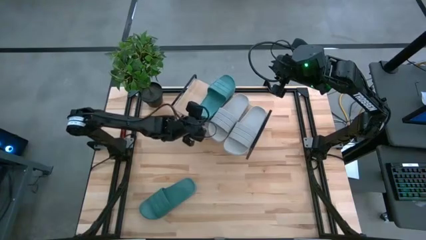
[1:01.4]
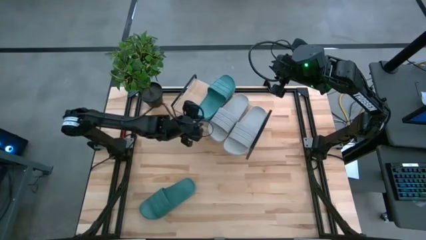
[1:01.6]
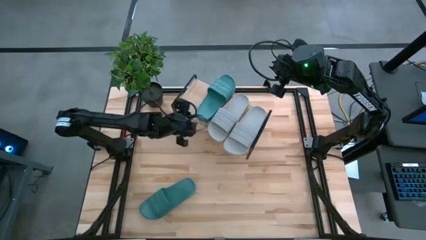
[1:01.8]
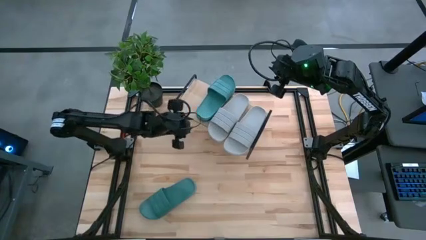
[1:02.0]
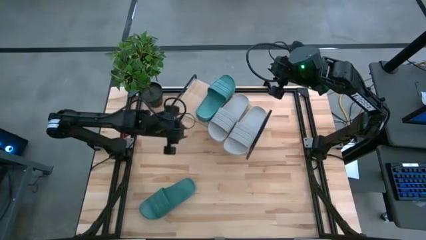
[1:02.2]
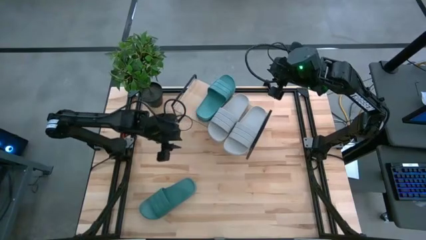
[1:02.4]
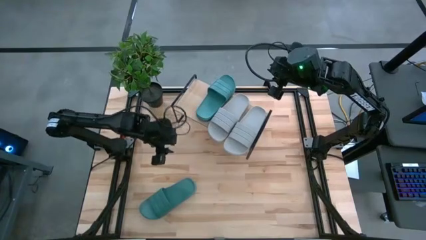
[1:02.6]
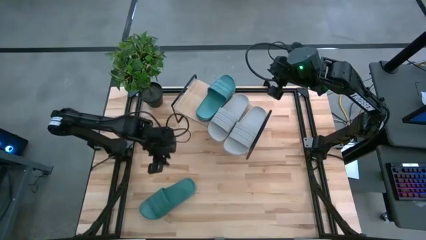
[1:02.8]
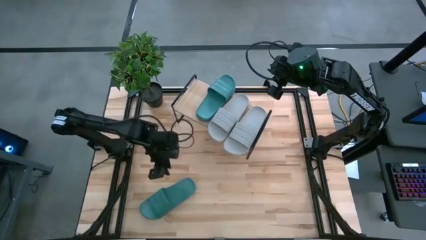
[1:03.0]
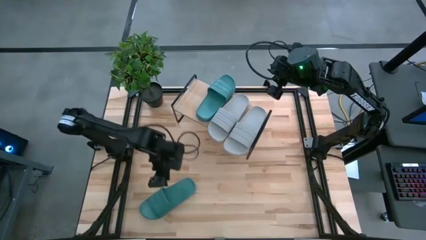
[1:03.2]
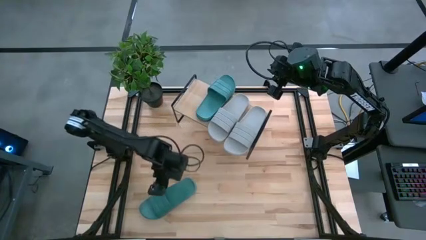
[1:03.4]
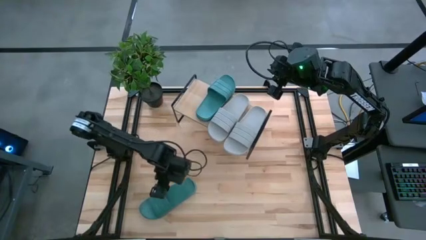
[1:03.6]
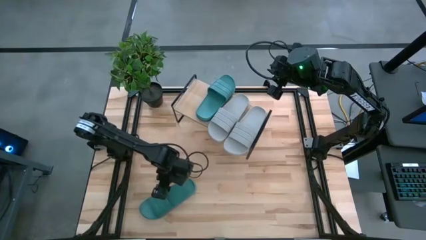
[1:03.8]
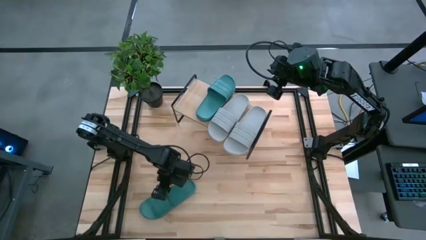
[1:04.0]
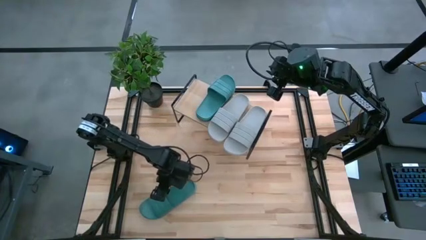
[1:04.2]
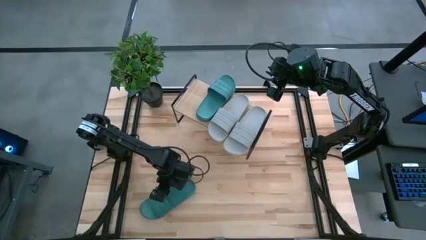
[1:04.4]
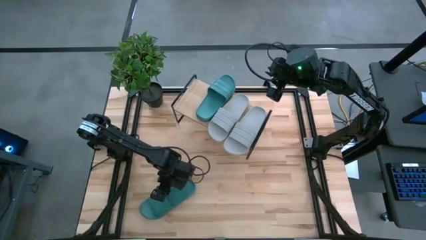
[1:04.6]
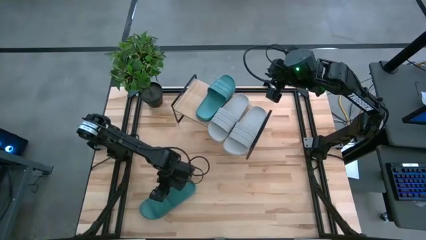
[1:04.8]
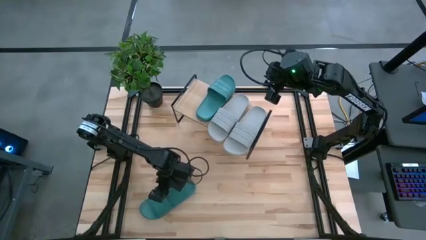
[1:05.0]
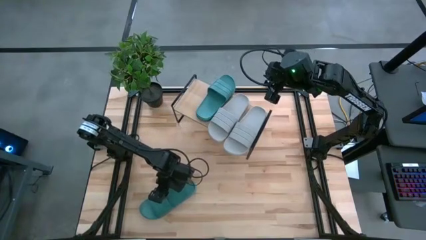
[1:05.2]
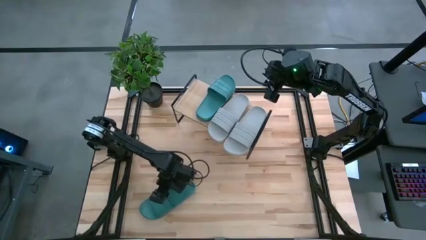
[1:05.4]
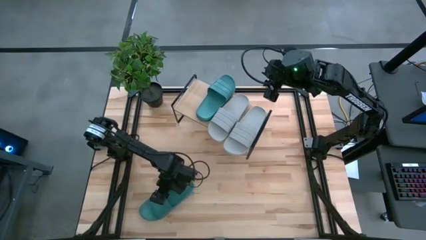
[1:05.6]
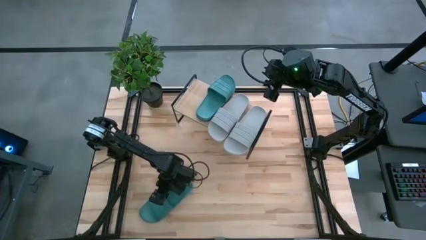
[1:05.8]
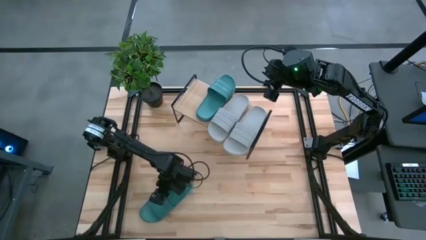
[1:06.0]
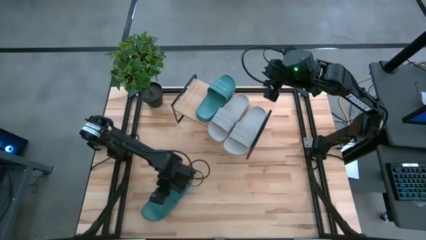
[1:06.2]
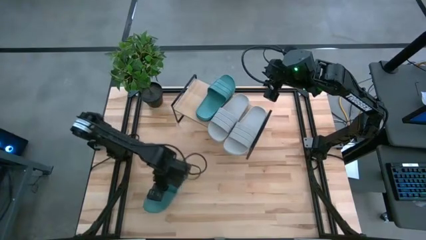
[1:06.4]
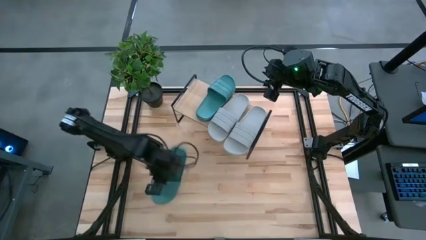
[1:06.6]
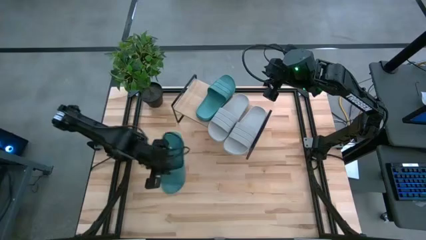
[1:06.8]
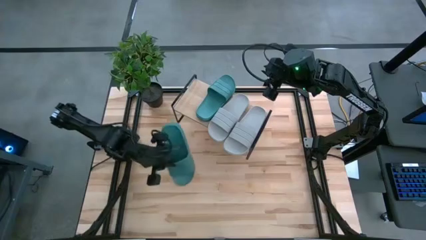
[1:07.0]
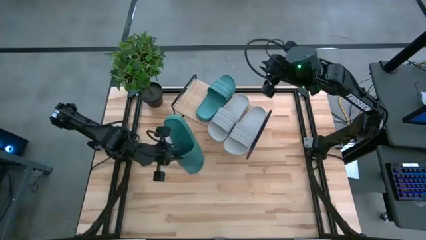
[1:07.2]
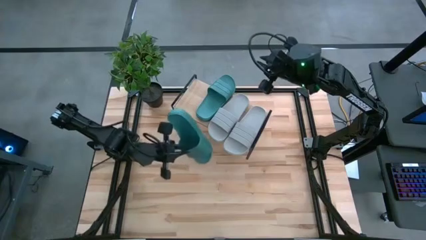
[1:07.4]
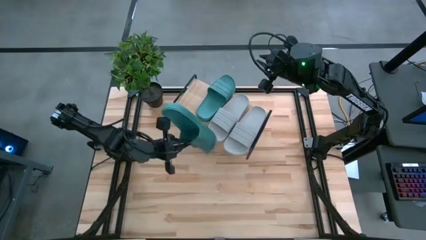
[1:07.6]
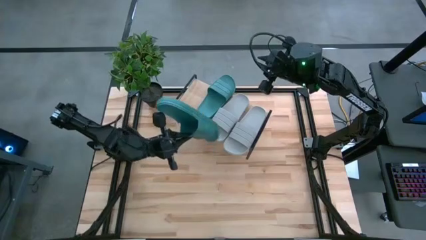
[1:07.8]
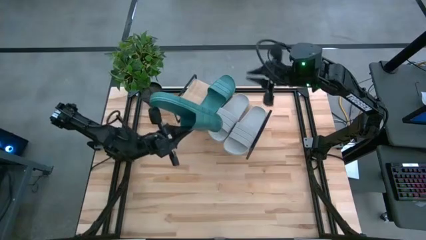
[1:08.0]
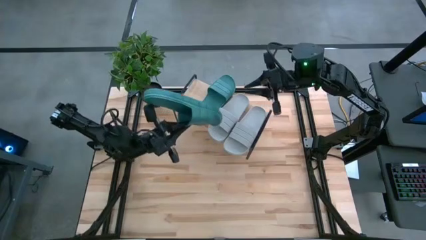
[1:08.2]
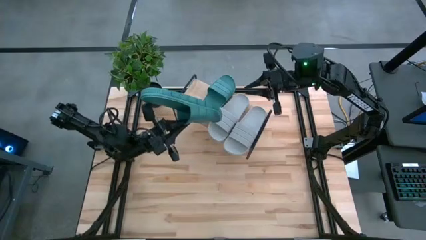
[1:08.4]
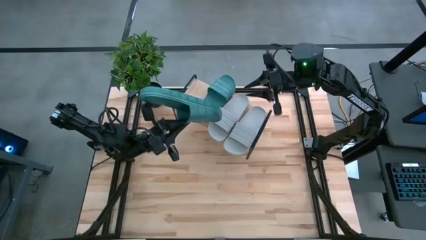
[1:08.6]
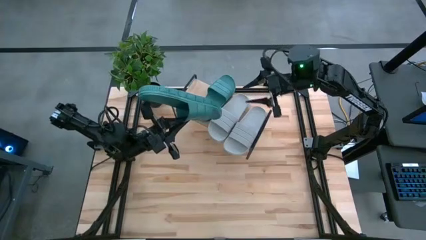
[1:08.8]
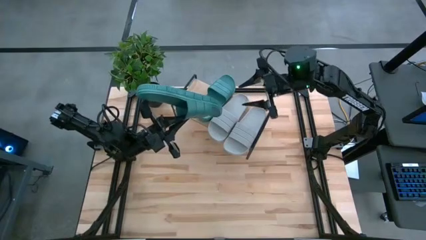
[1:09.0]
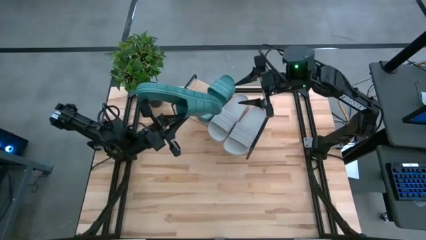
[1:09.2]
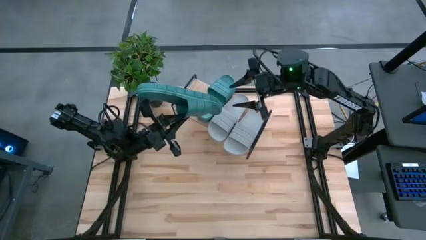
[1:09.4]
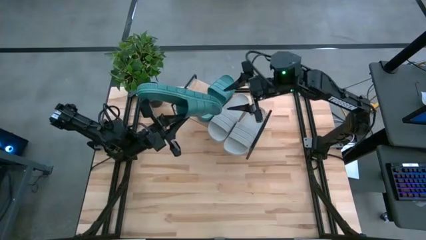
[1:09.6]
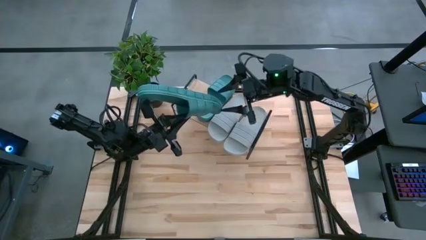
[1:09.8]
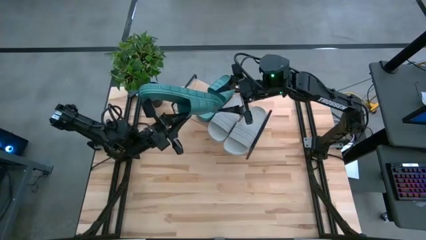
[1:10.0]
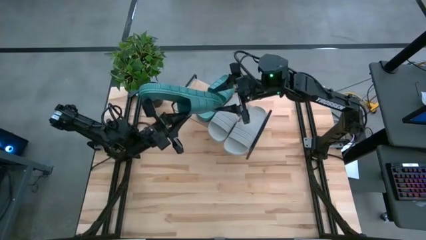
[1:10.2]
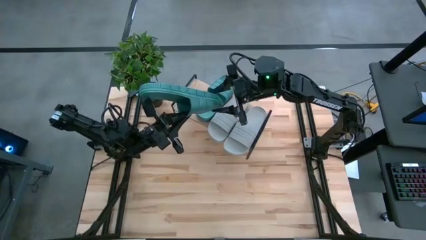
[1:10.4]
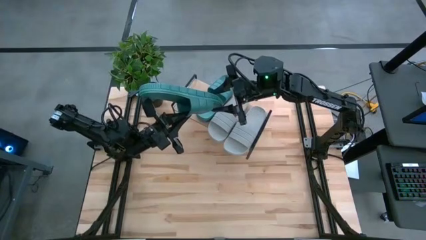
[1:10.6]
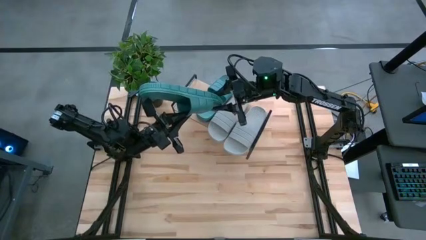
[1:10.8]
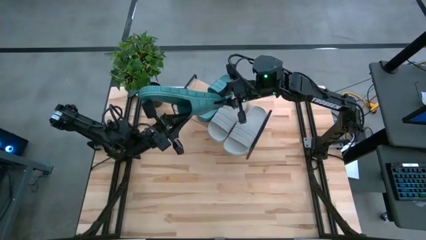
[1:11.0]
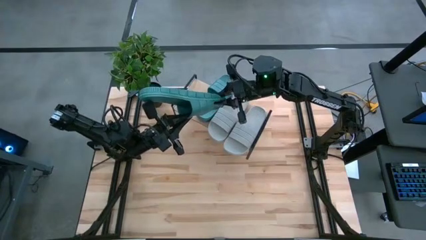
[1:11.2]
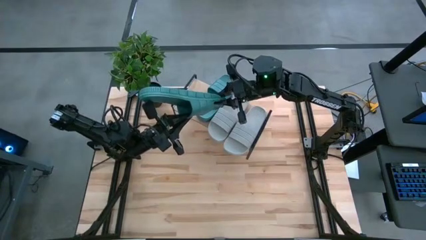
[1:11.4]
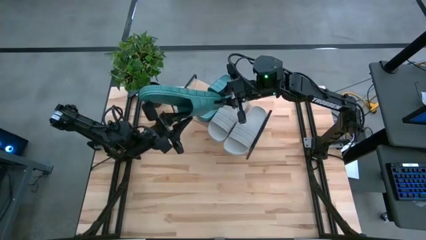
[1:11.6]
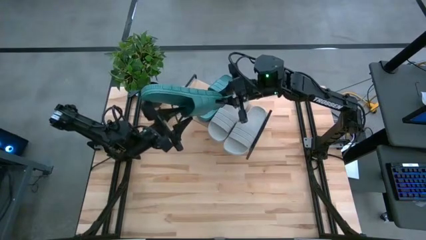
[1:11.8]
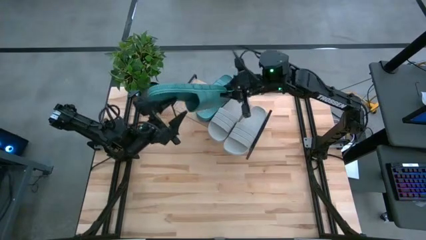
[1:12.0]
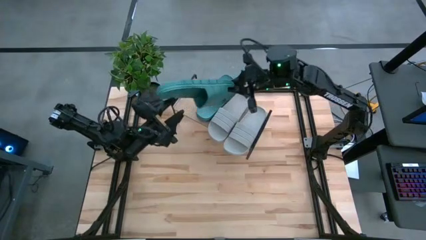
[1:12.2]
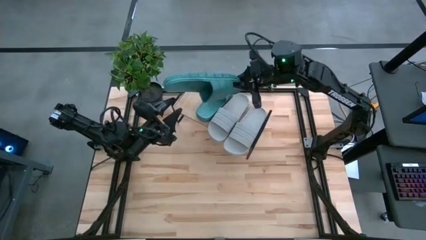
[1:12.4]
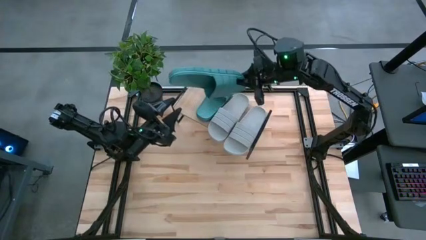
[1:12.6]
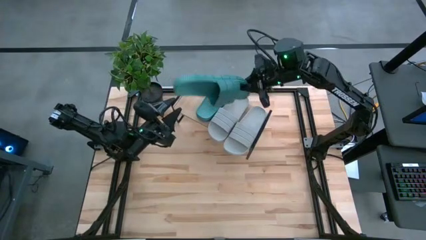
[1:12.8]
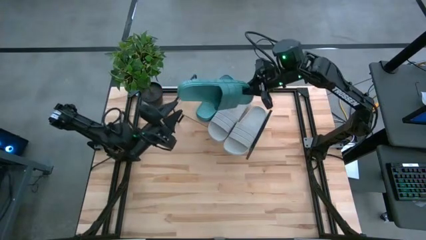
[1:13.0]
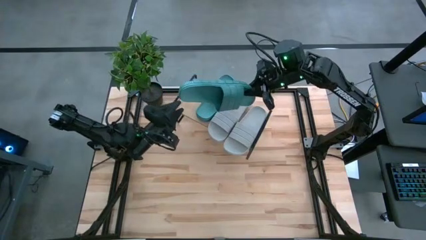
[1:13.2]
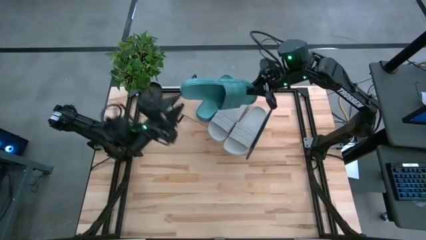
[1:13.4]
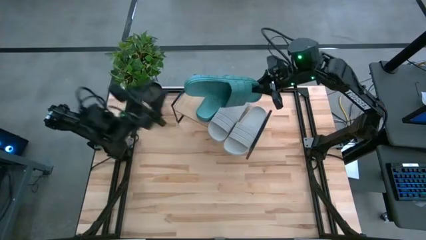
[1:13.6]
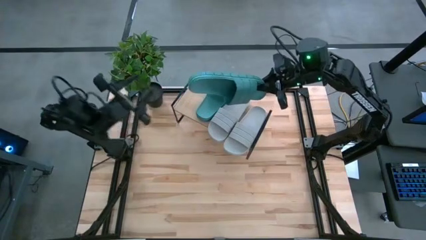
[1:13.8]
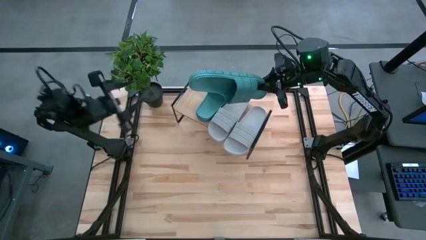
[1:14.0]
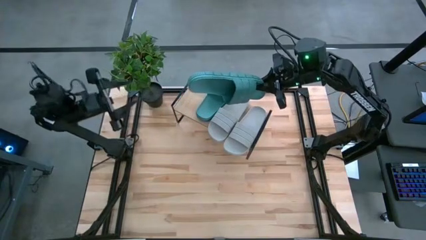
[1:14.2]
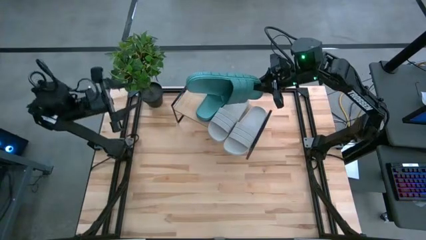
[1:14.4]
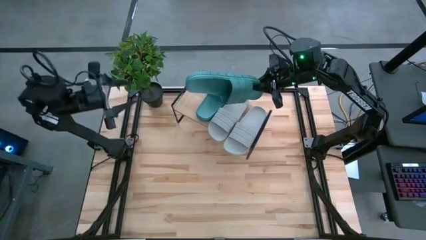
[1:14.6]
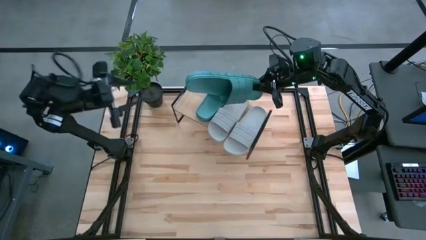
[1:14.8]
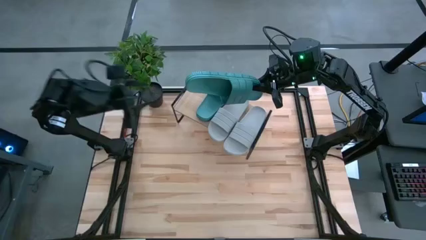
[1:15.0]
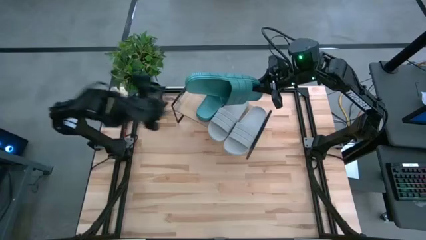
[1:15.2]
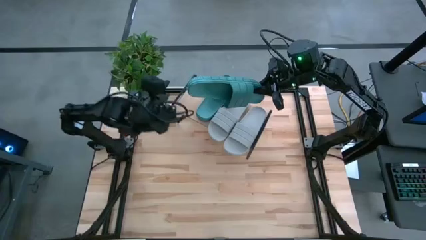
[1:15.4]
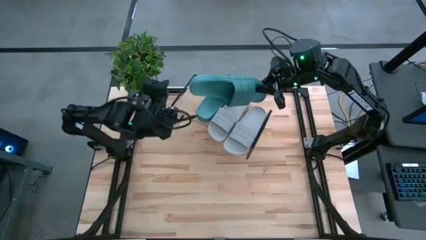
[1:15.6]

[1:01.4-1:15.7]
Task: Pick and place slides into the shelf
Put the green slide on the shelf
